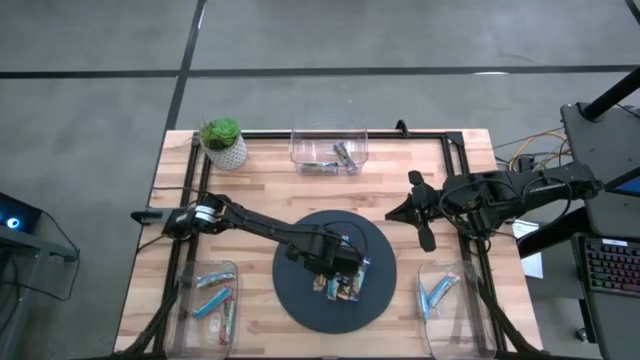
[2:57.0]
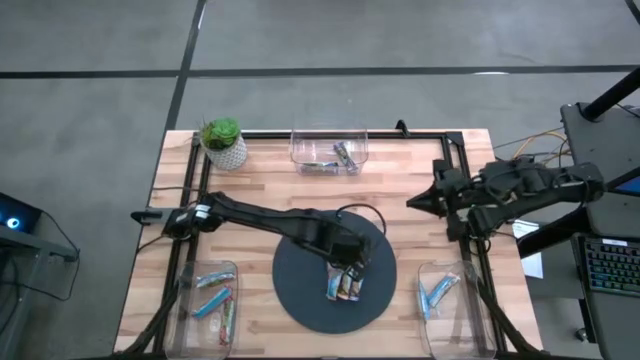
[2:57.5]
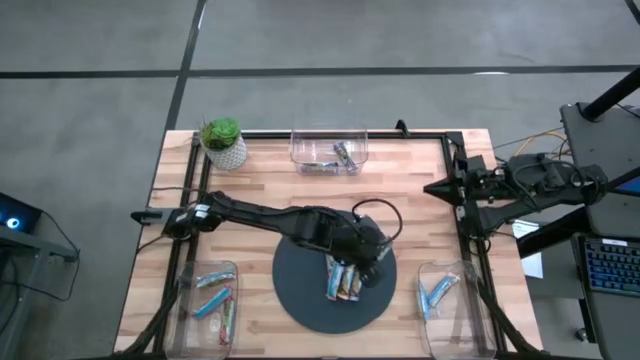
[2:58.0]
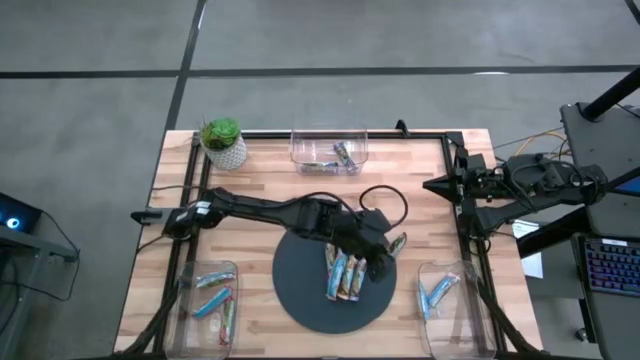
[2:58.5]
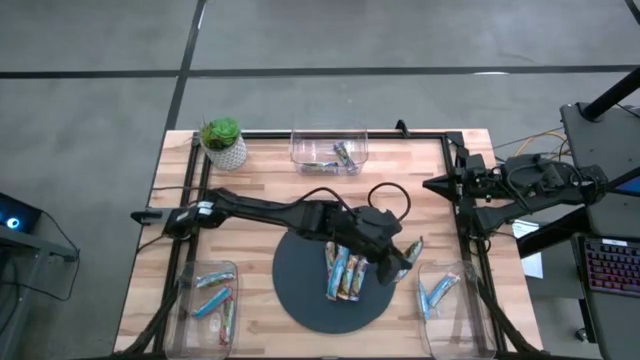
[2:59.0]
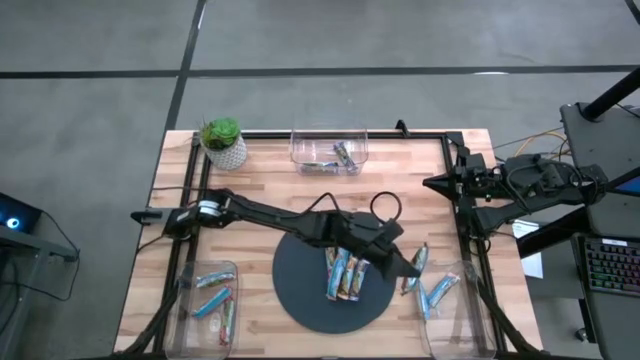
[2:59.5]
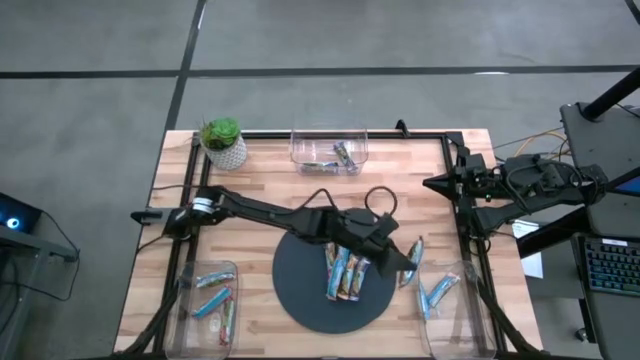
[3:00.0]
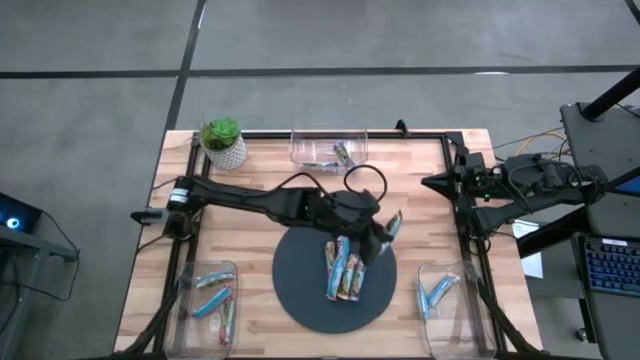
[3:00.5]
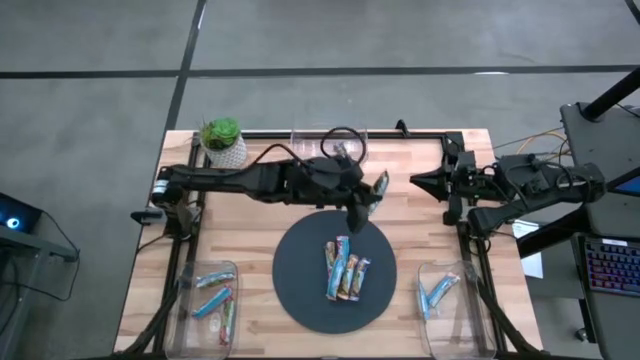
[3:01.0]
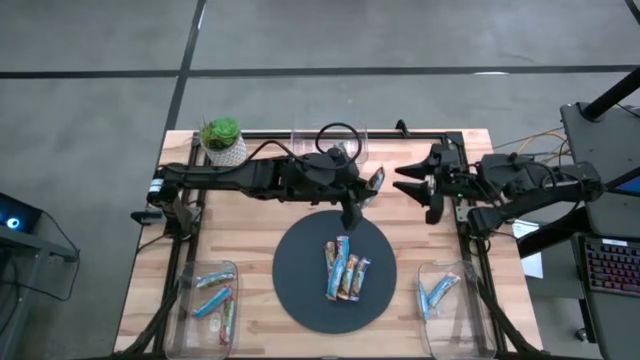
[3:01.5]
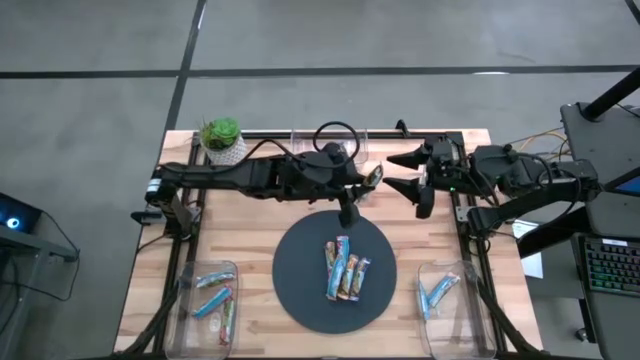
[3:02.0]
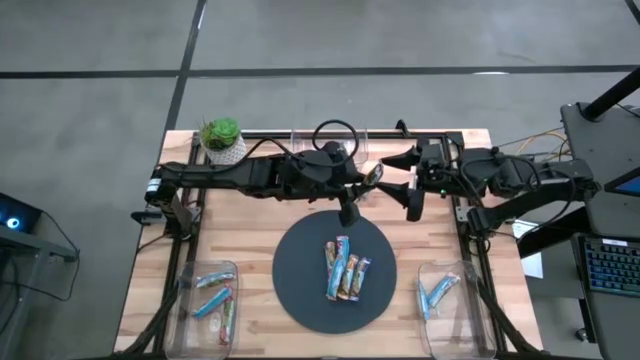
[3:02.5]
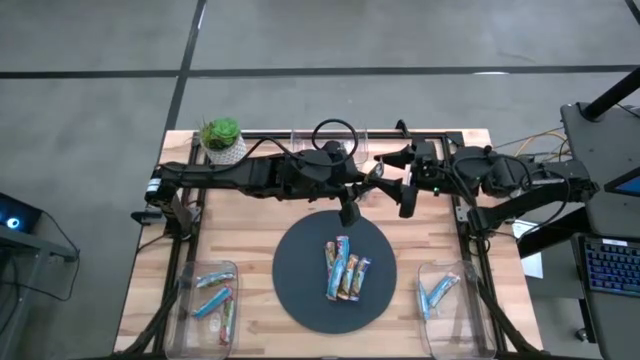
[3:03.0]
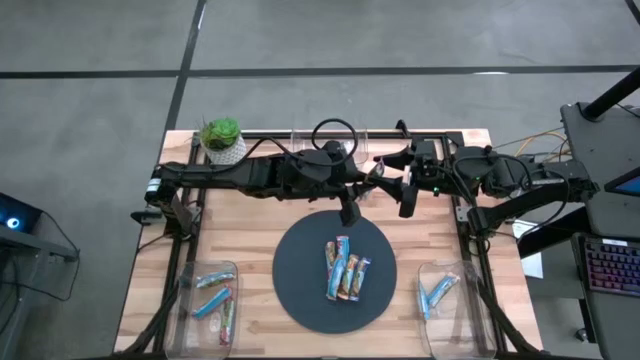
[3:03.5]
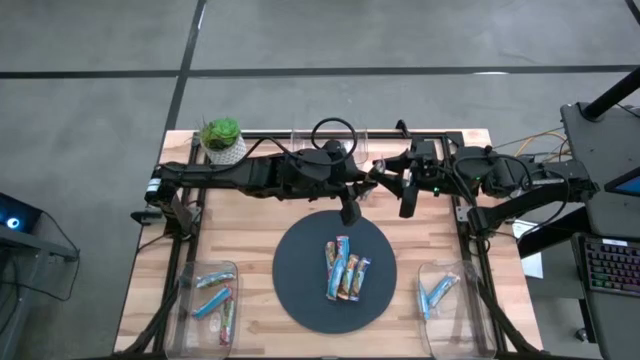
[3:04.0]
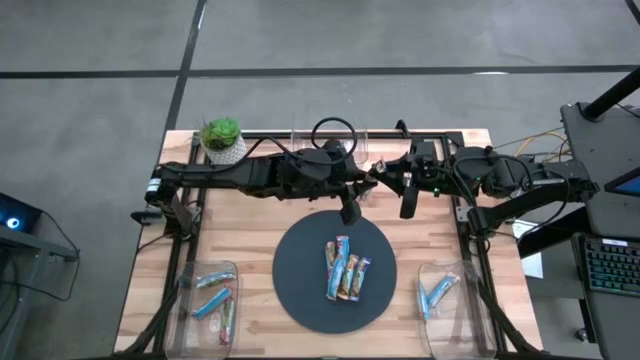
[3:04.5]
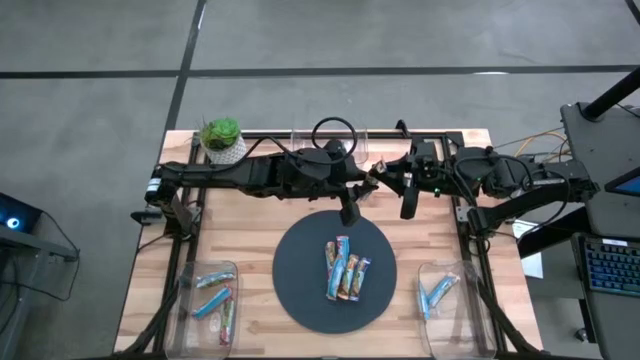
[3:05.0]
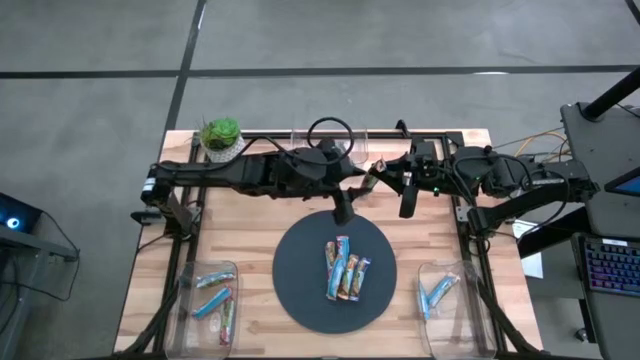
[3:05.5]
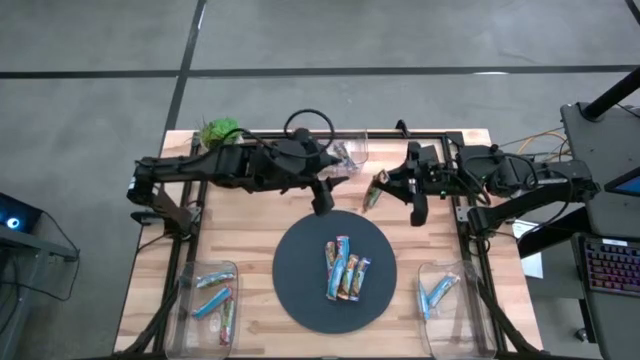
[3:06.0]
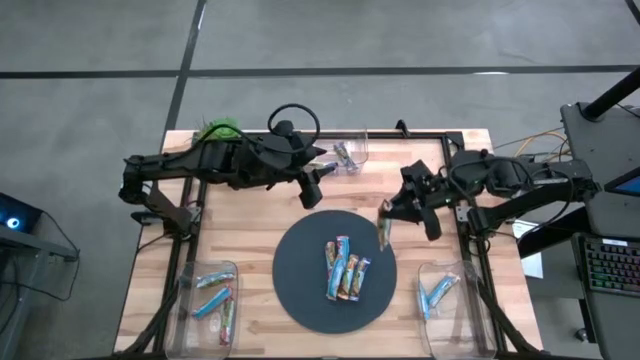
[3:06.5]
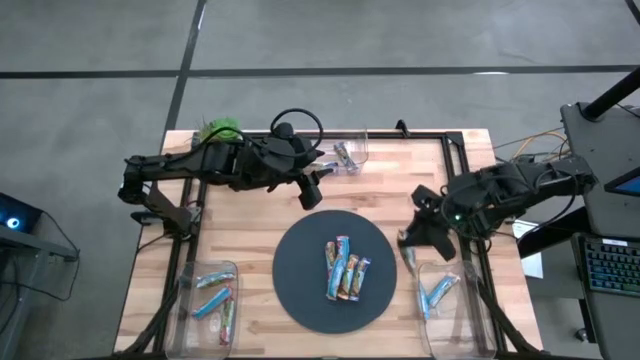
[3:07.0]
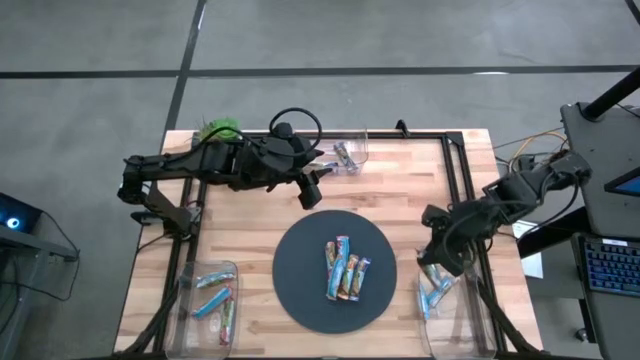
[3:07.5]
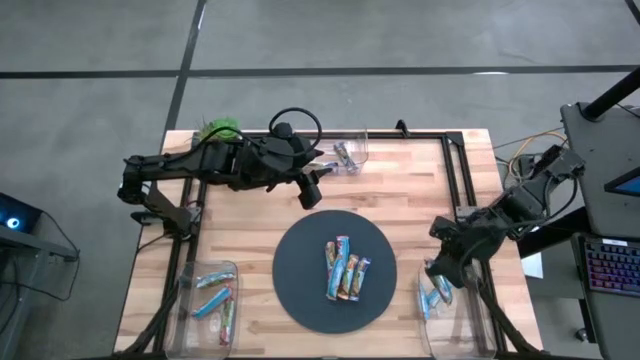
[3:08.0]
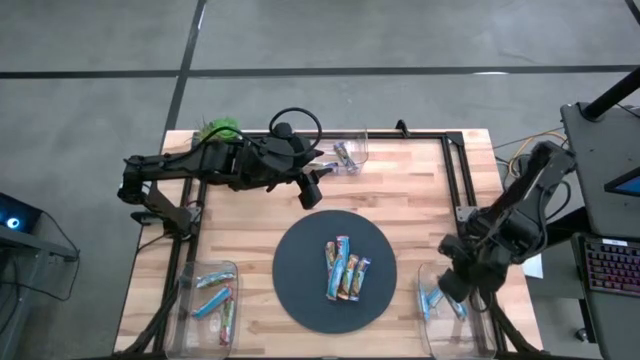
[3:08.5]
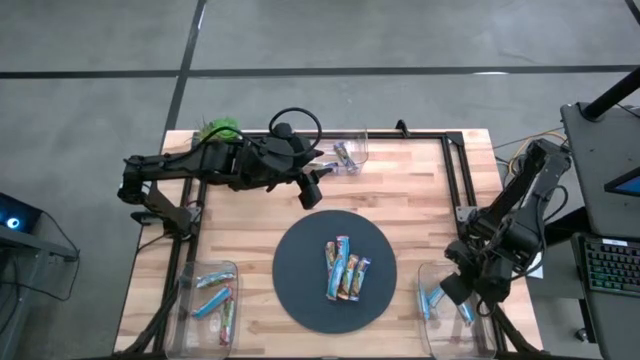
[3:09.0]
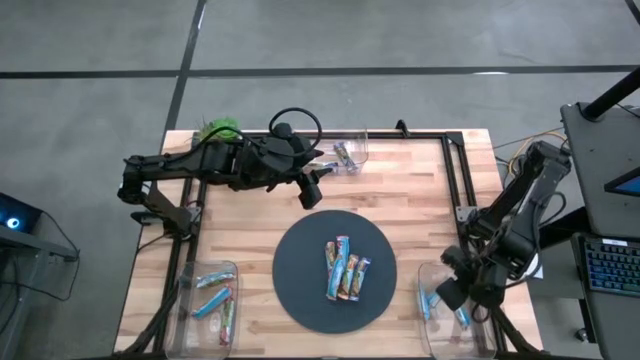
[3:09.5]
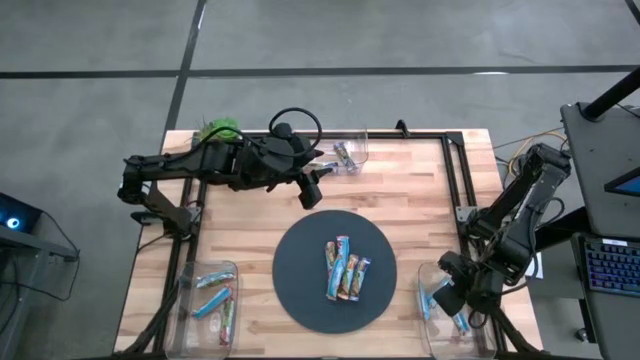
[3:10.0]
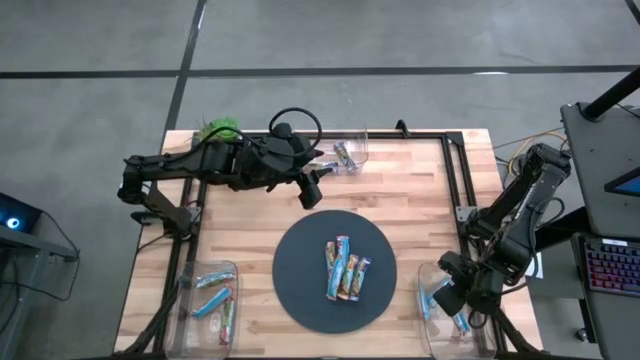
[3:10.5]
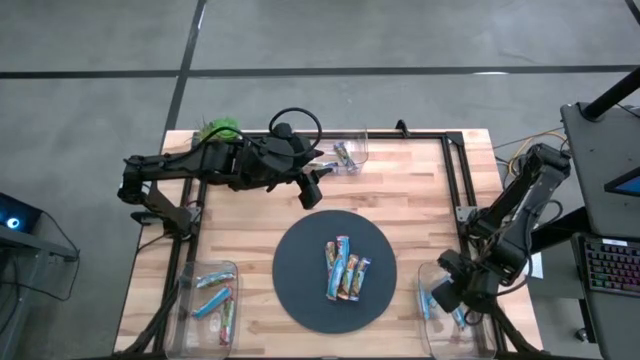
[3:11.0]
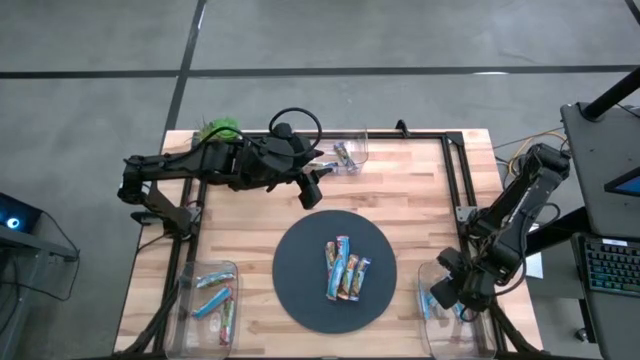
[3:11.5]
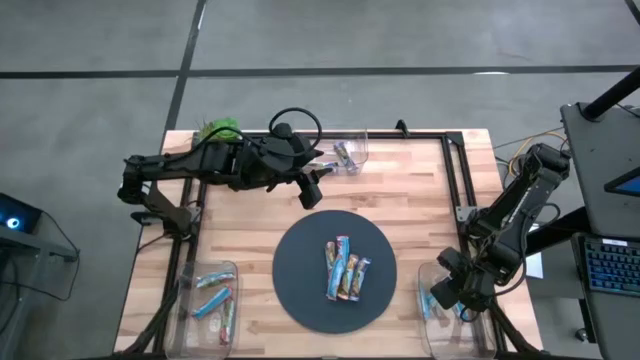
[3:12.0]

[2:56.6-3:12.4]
Task: Pick and place Granola Bars by type
Put the yellow granola bar into the bottom right transparent bin

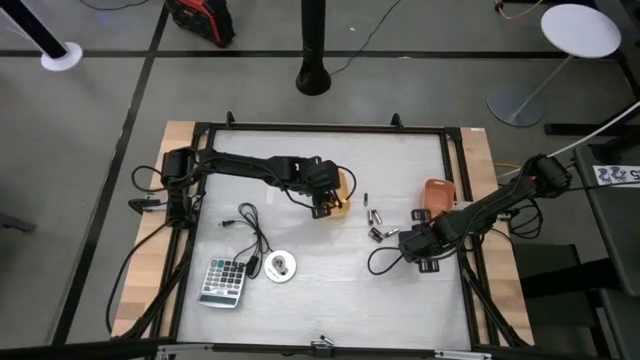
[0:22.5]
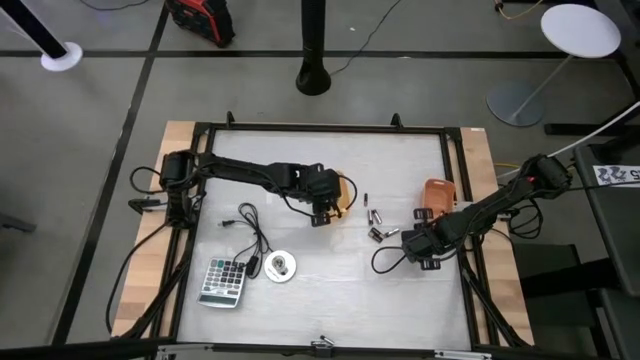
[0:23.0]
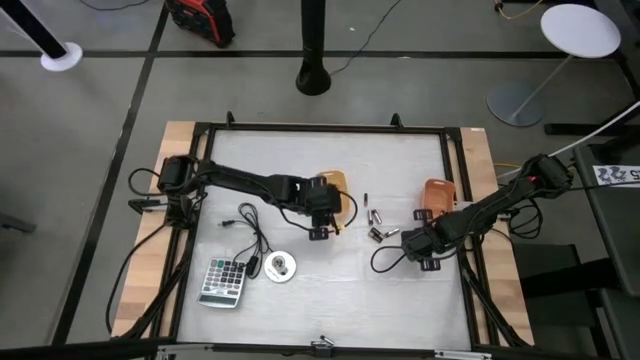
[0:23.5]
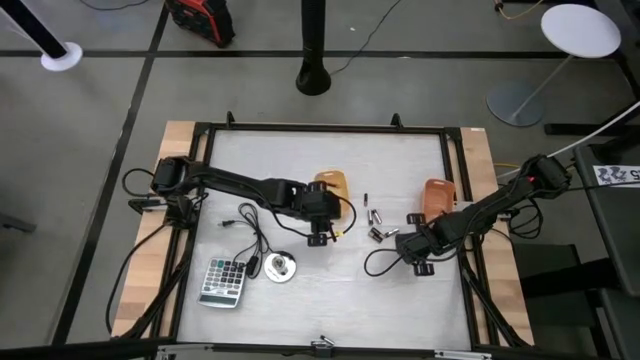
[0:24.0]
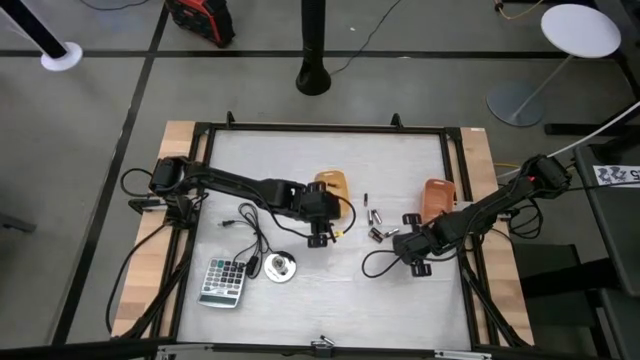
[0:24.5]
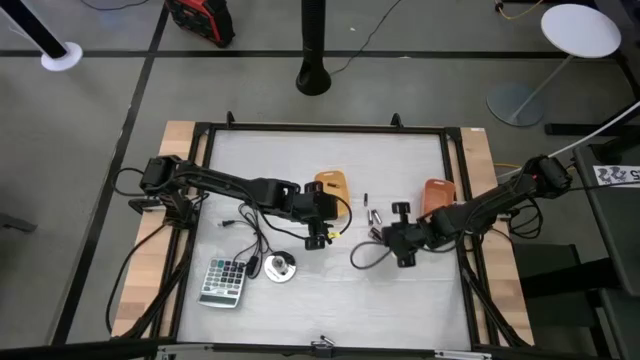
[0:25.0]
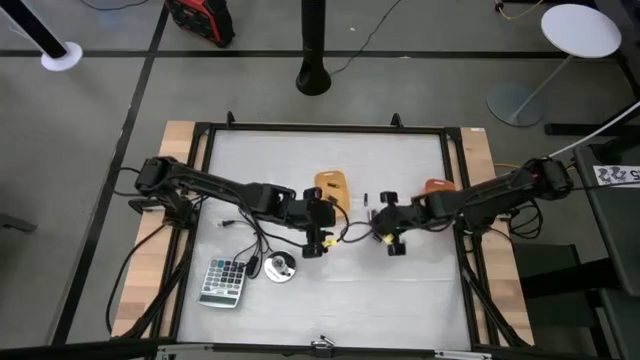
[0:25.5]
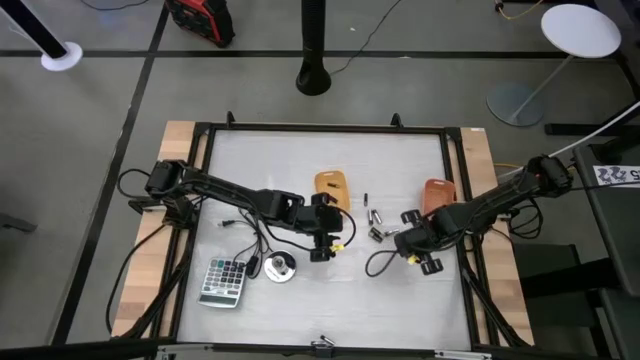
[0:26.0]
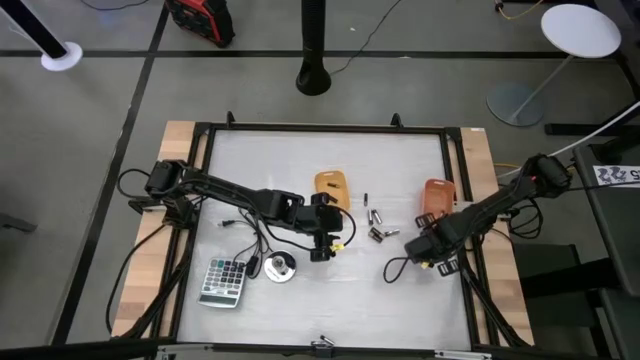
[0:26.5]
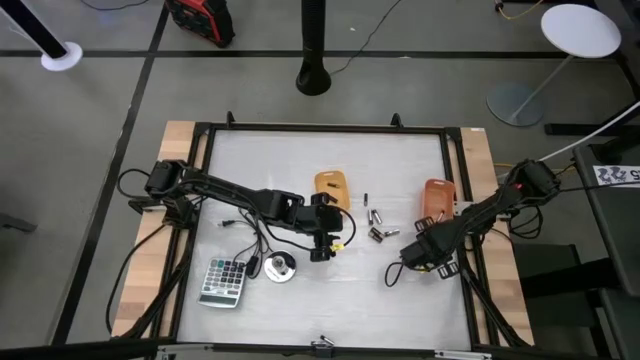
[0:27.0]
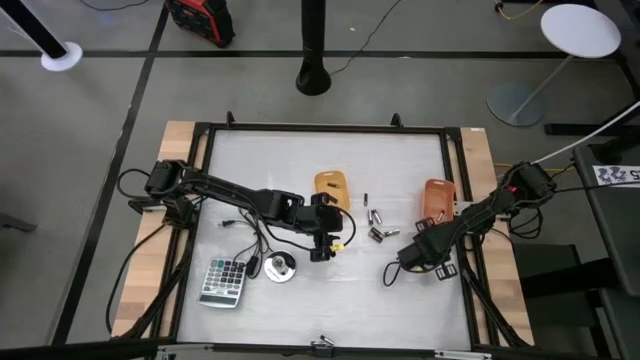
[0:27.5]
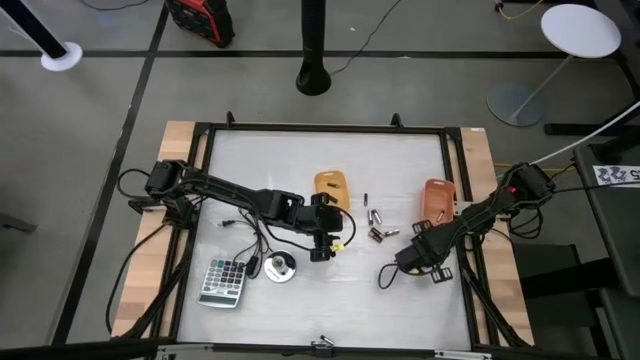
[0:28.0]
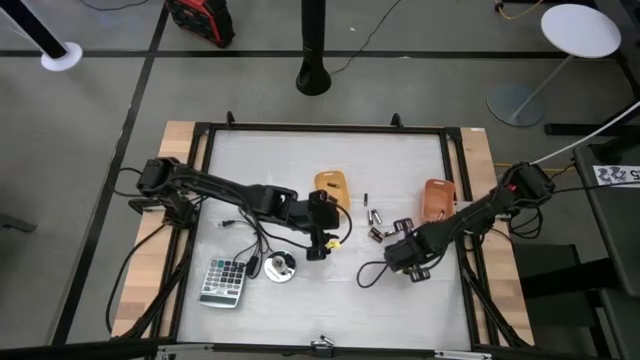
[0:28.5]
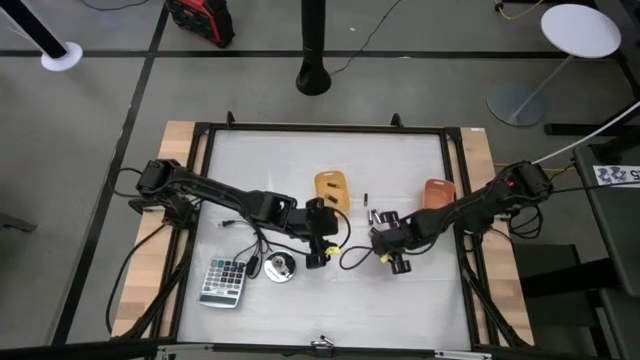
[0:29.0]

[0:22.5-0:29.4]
Task: Sort batteries
Put the black battery into the yellow bin
